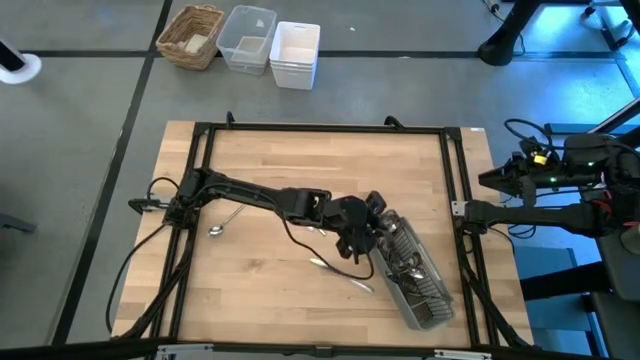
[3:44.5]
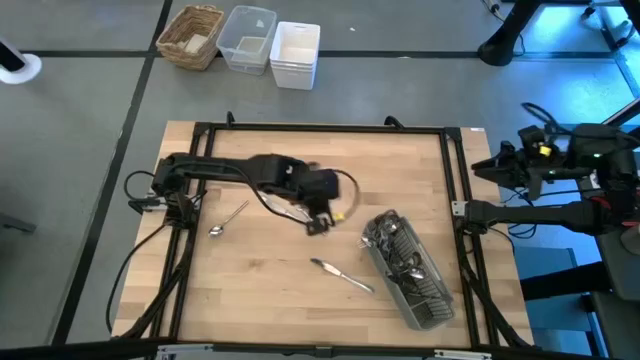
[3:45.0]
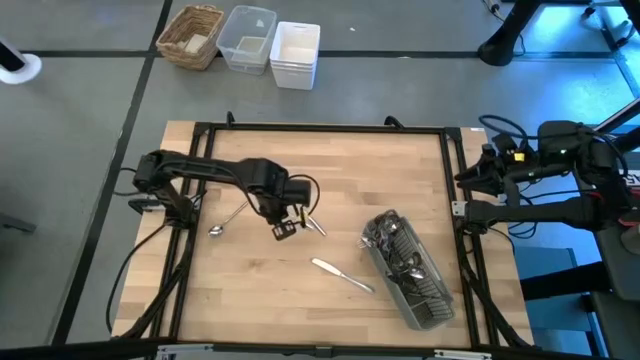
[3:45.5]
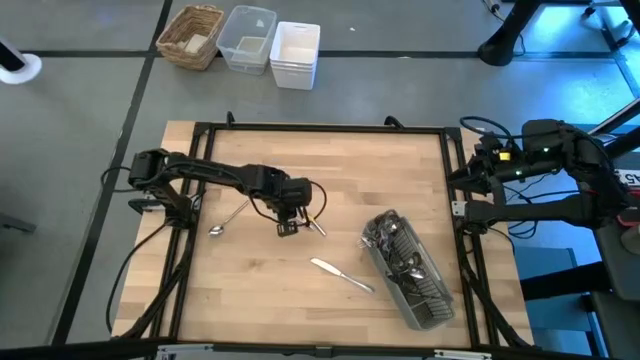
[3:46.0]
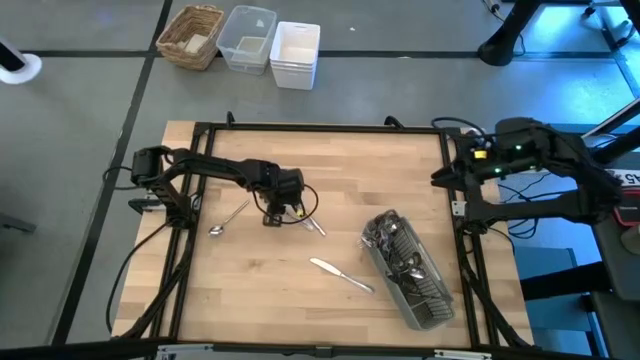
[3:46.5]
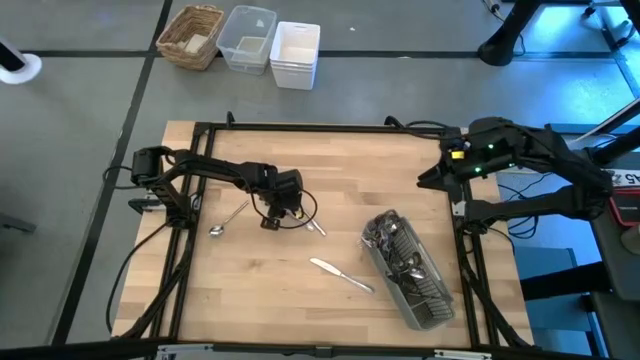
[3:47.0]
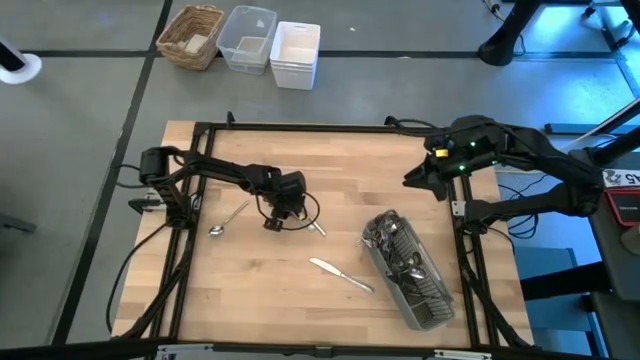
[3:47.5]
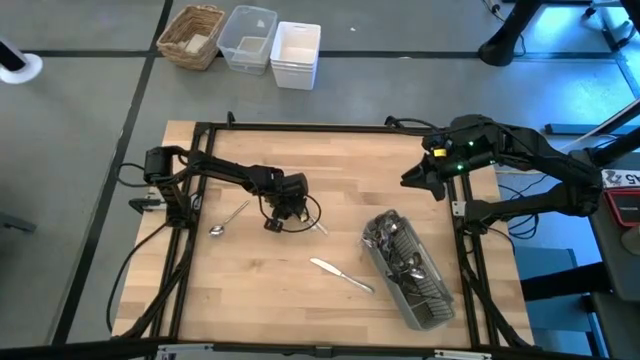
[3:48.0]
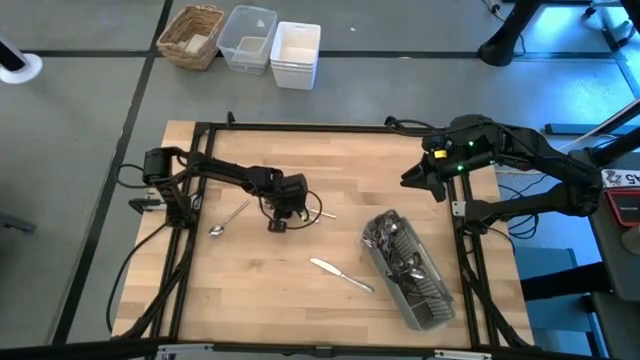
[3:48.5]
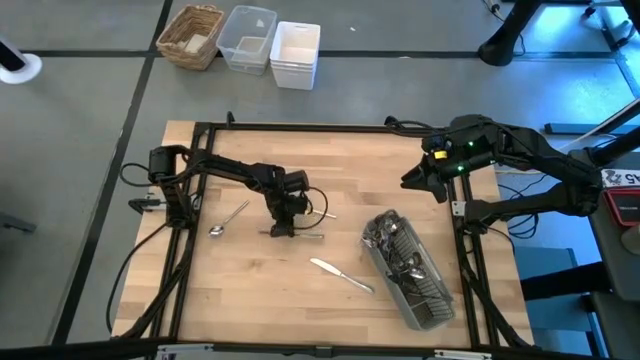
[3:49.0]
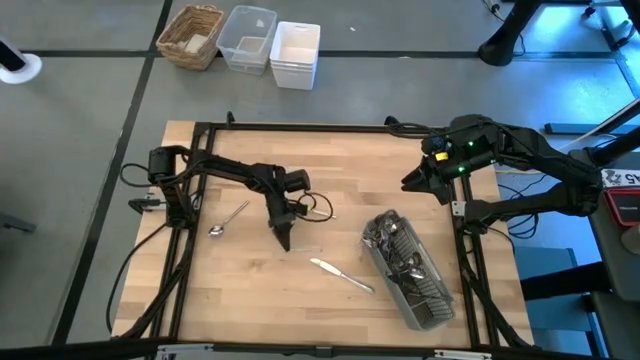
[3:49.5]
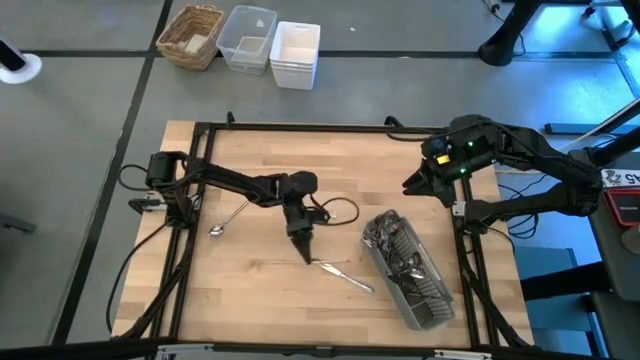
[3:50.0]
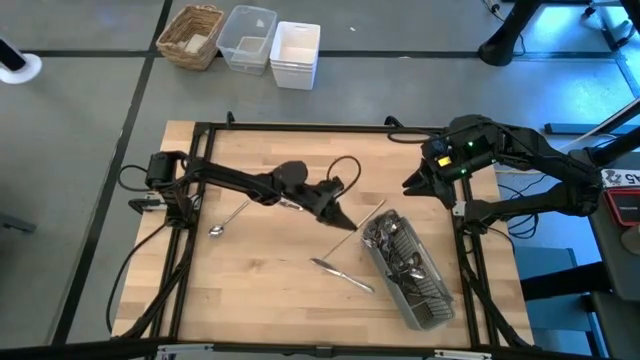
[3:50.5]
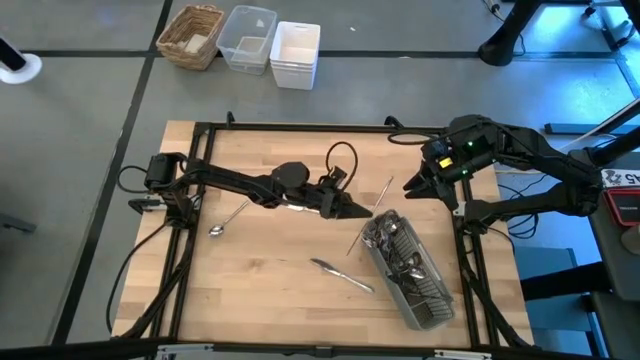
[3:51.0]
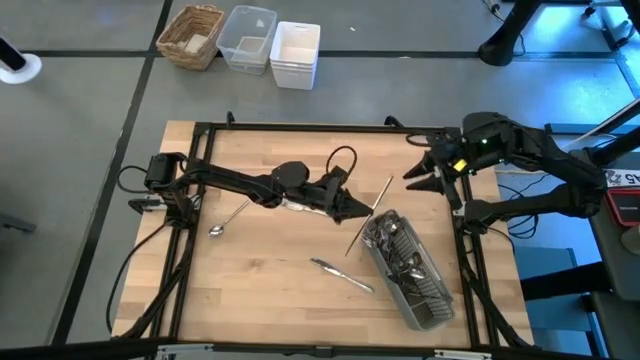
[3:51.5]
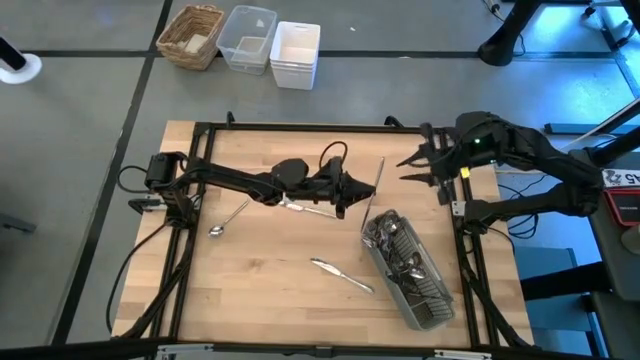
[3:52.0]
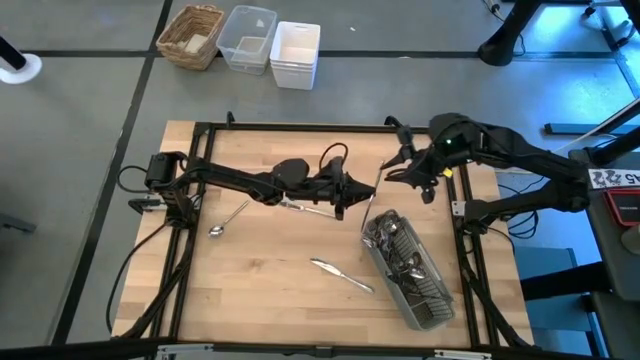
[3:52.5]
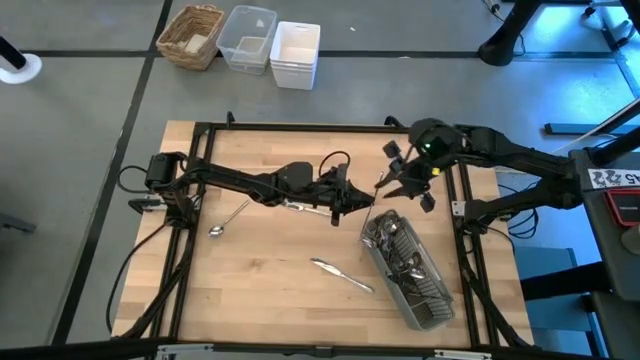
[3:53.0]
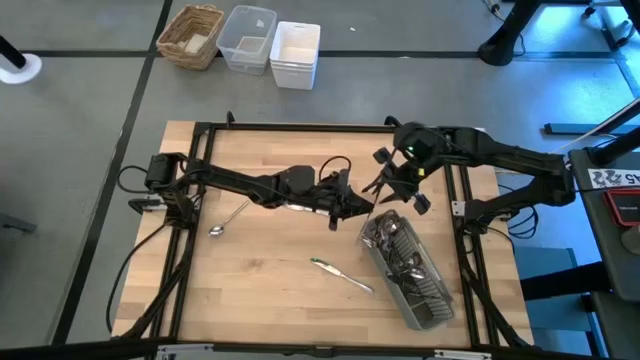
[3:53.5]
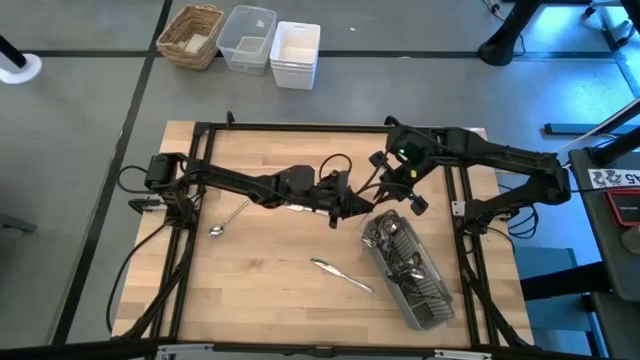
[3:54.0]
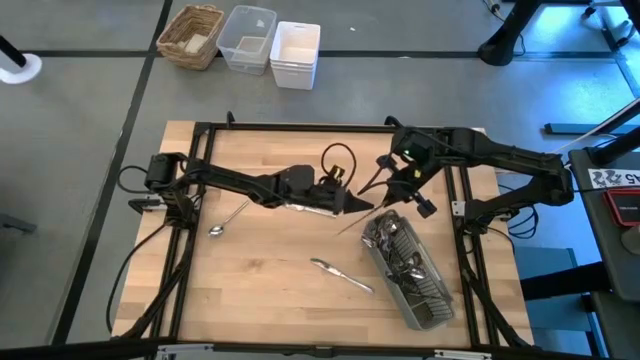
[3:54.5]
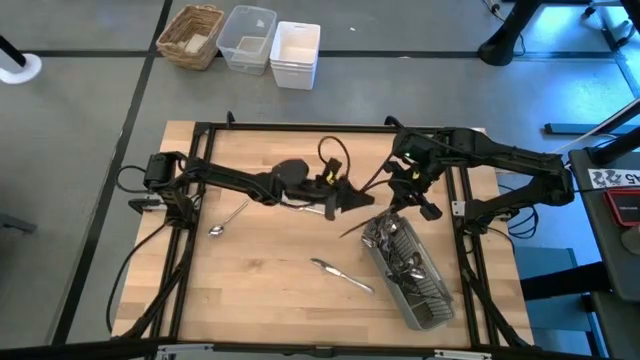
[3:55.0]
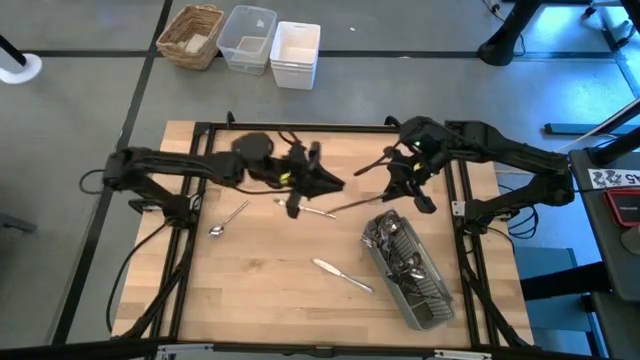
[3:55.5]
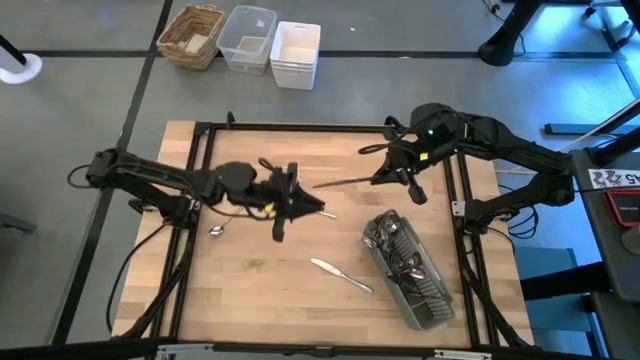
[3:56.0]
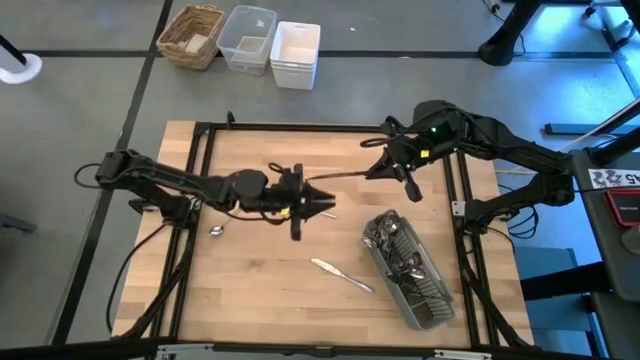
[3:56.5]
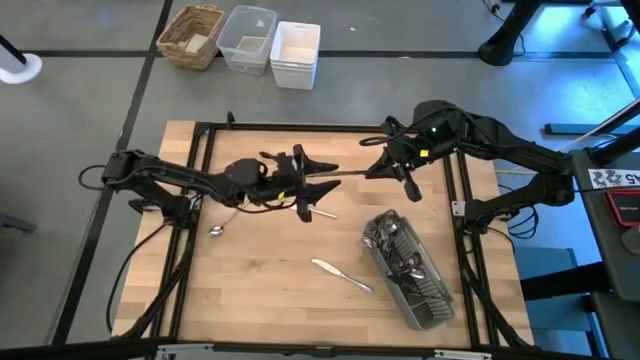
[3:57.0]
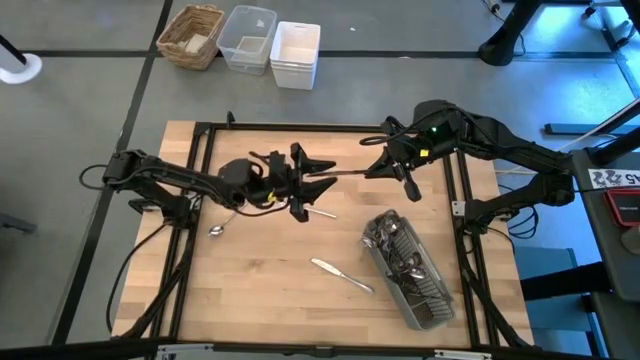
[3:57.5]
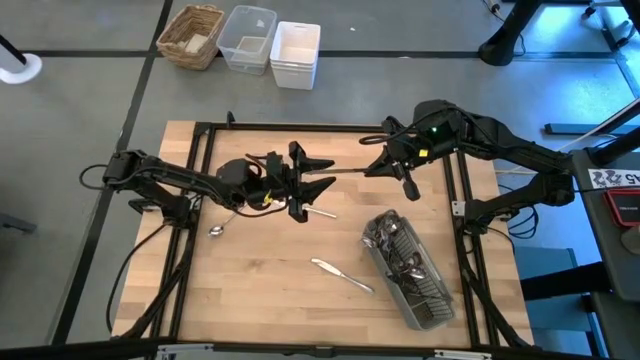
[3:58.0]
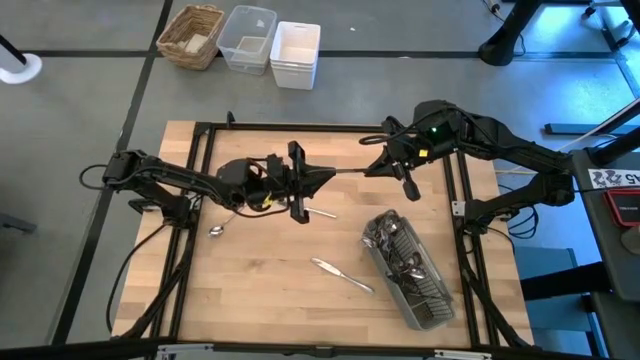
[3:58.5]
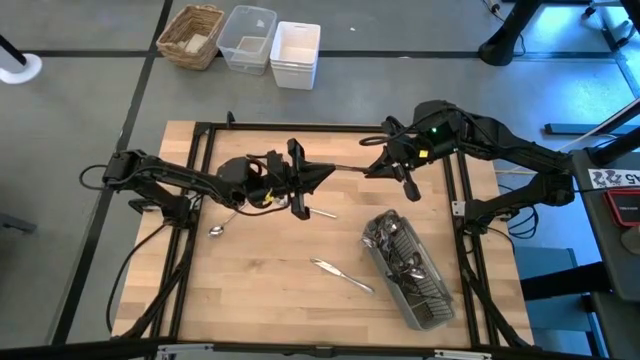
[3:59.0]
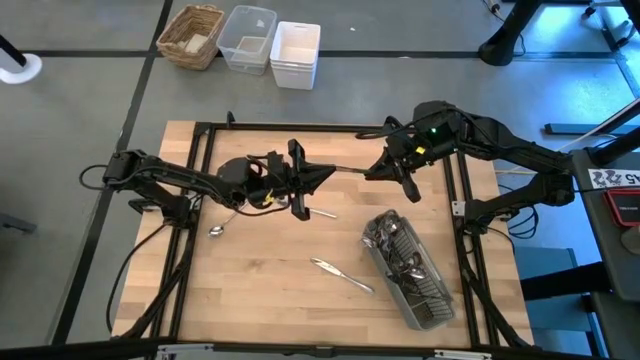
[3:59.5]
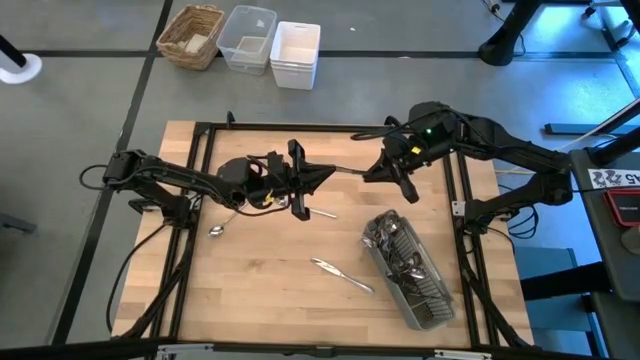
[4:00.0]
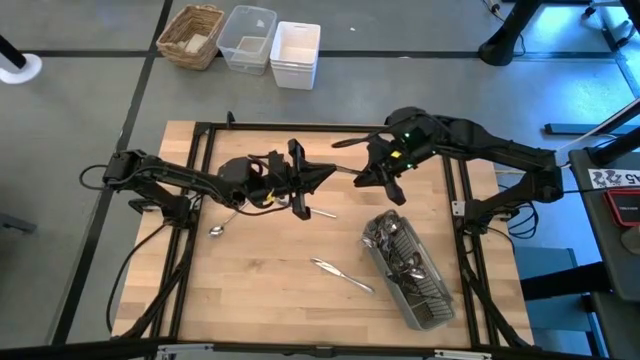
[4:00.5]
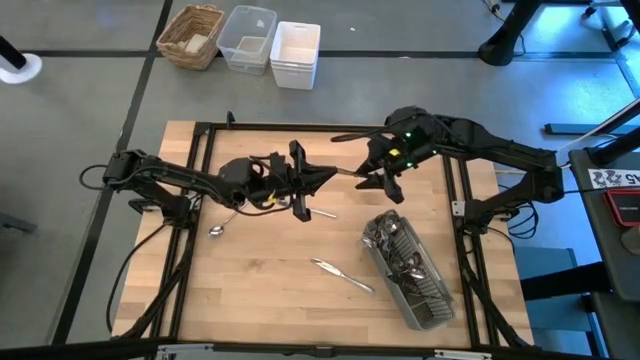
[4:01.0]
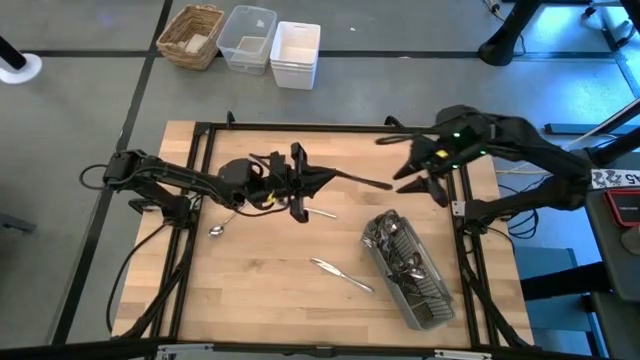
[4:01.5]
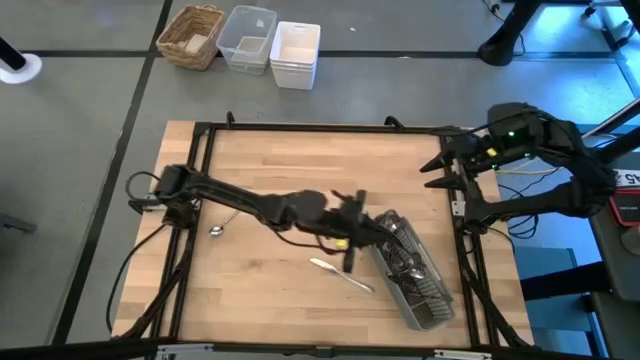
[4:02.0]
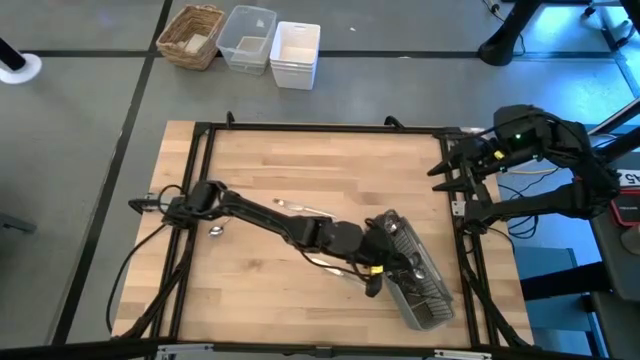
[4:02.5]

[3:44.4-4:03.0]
Task: Sort silverware
Put the silver table knife into the gray silverware basket
